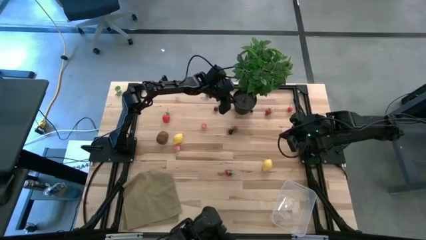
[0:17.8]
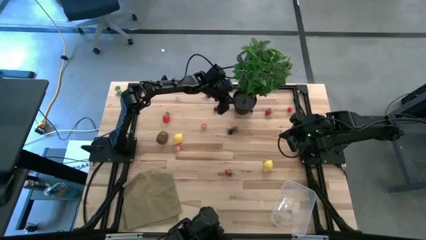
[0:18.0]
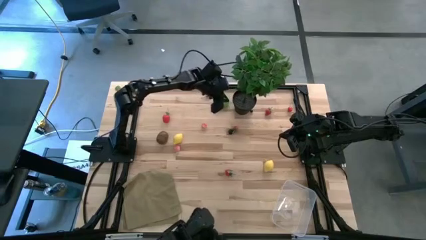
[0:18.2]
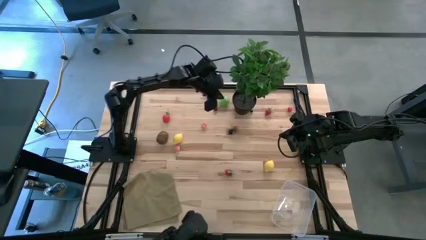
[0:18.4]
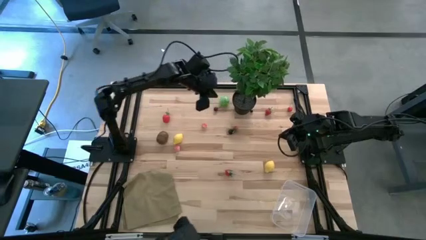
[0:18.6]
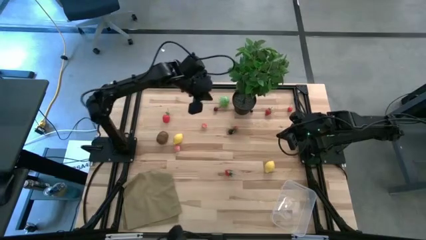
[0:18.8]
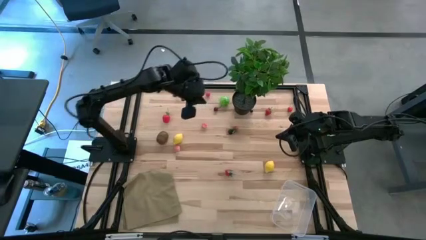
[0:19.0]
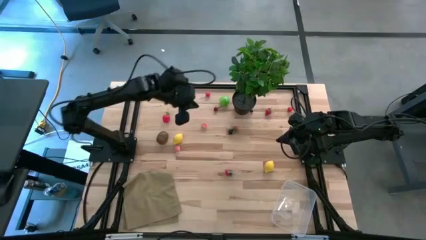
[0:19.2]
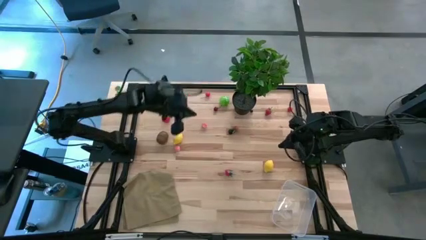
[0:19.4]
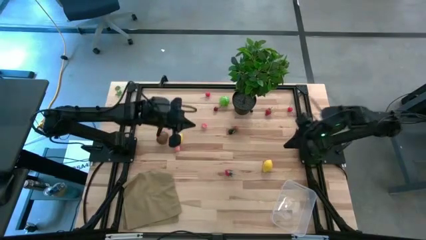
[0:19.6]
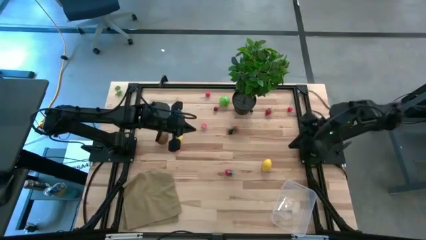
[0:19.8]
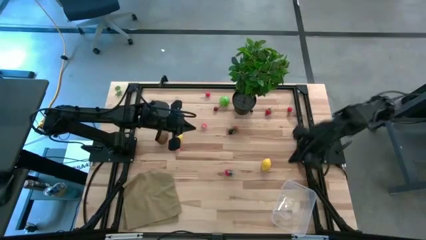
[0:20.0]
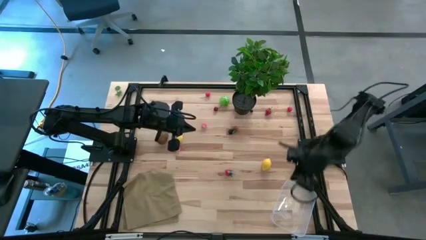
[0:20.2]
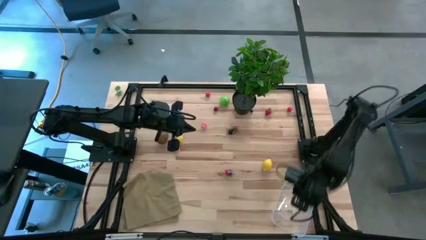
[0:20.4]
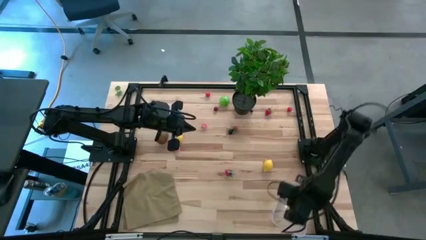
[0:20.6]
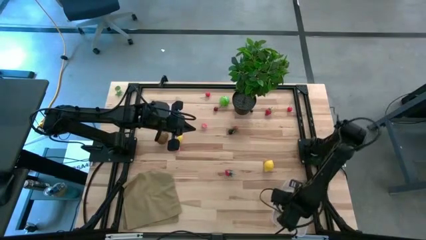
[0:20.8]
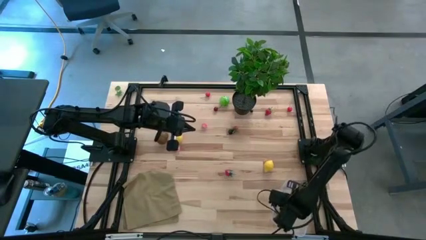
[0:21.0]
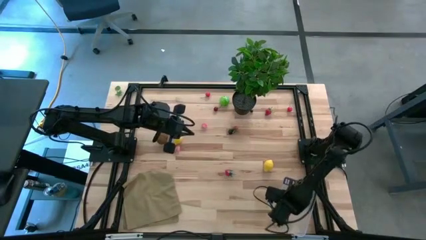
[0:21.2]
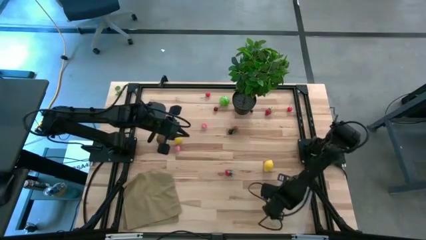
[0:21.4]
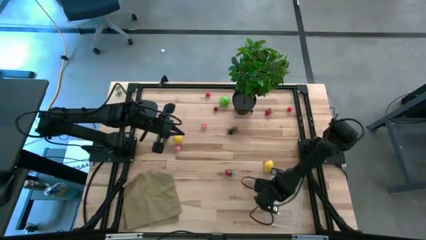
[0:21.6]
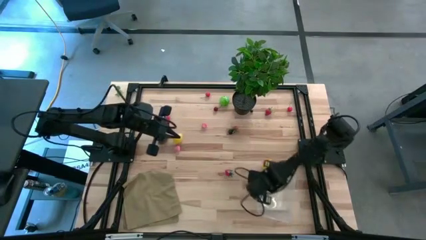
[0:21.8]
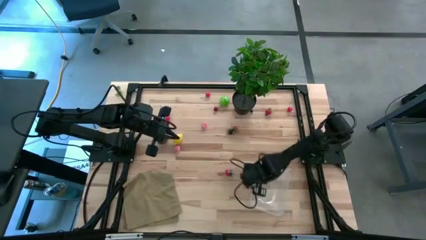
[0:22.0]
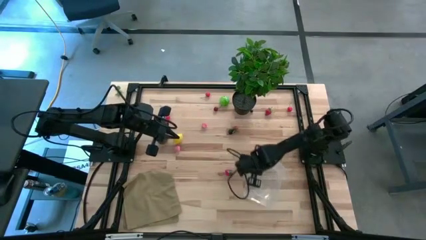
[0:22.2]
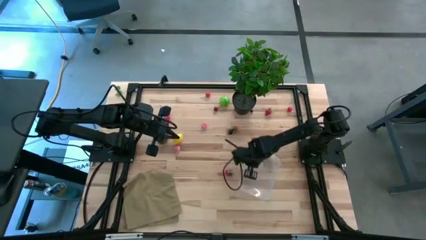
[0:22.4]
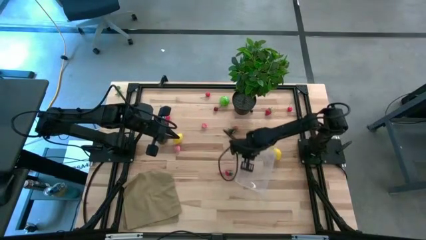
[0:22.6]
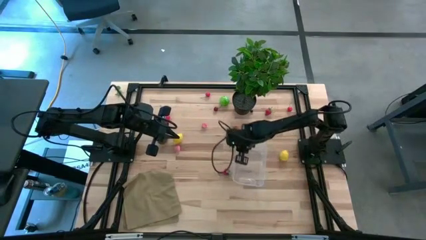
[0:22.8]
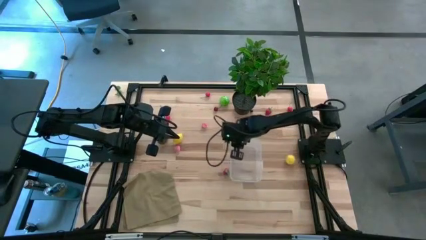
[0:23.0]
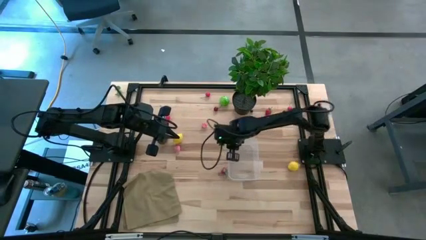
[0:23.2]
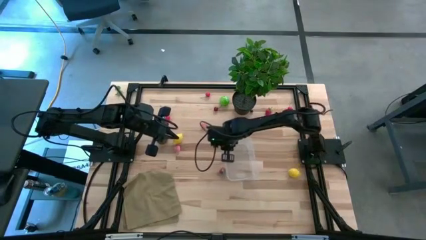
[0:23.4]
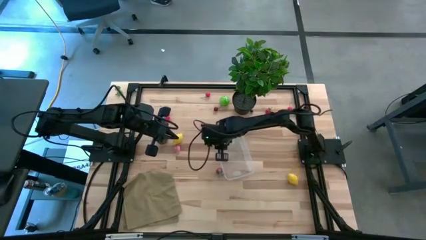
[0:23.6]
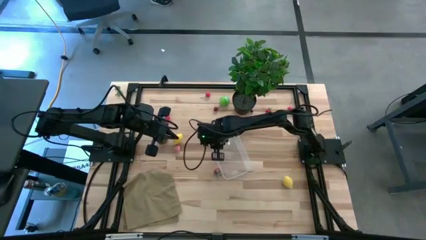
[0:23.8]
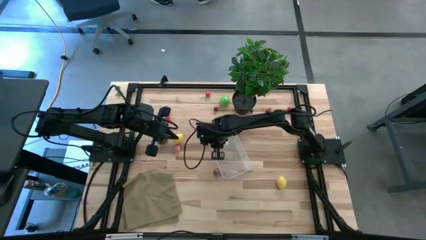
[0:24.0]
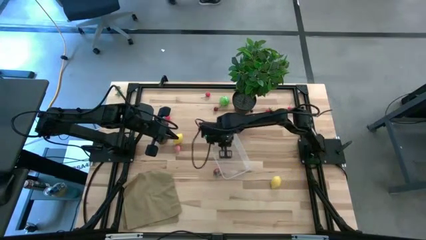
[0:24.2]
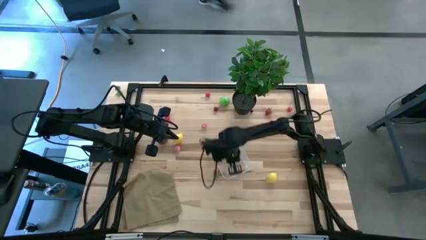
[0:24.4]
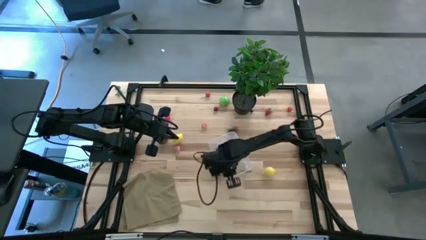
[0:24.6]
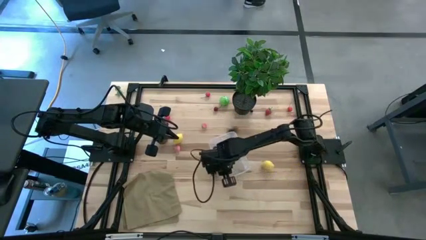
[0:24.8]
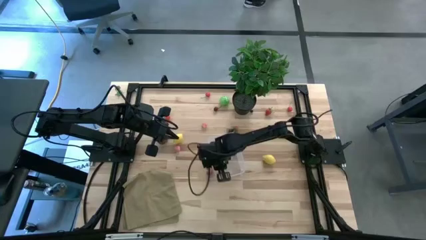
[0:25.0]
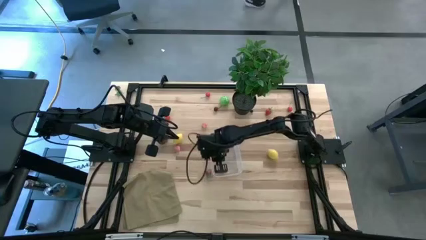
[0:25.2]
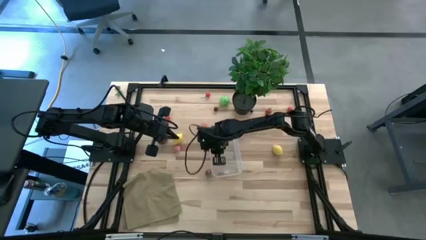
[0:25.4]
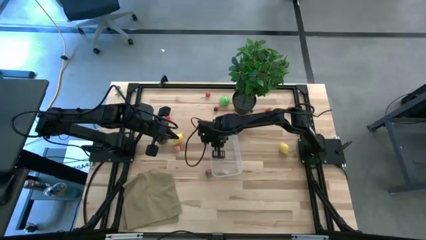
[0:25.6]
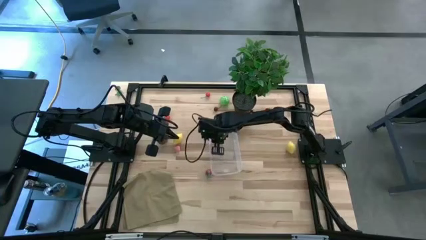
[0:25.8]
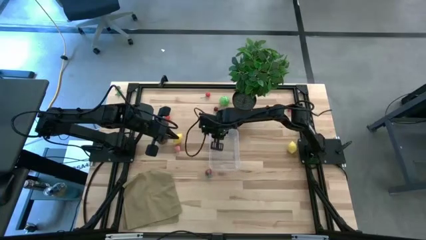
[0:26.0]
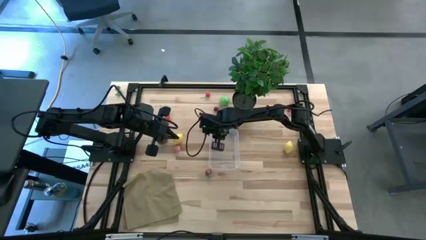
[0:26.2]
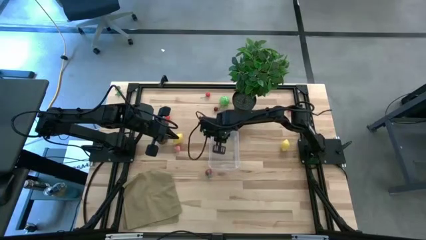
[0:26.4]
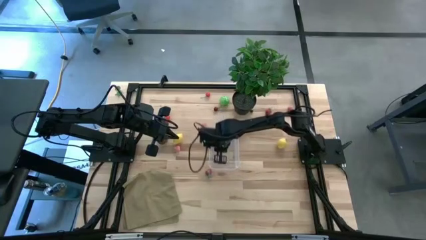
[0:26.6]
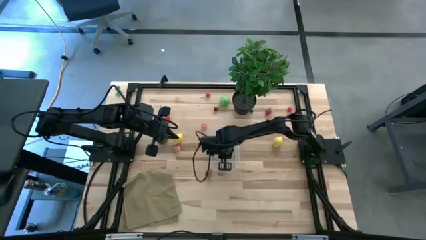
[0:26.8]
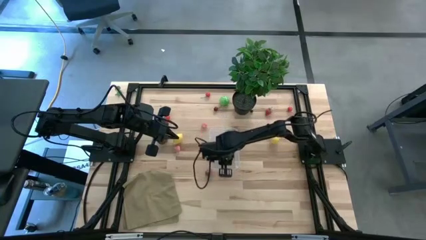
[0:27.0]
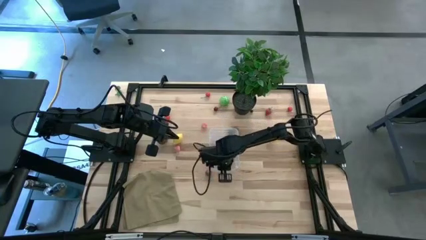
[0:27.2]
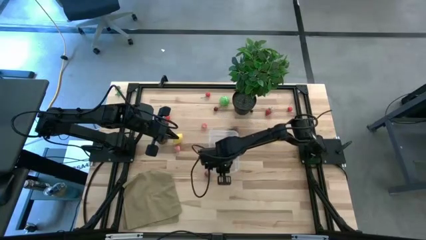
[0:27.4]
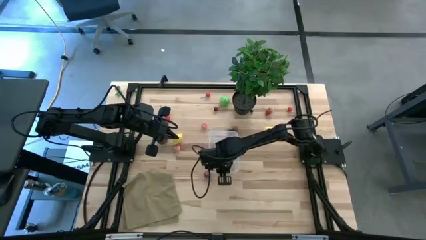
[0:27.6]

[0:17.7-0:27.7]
Task: Pick and placing Produce into tupperware
Move the transparent container from the bottom left of the table to the center of the table
